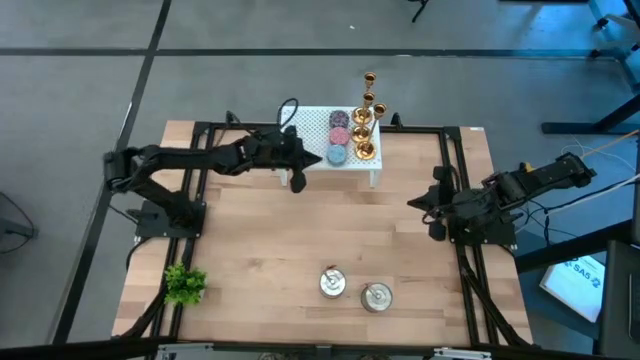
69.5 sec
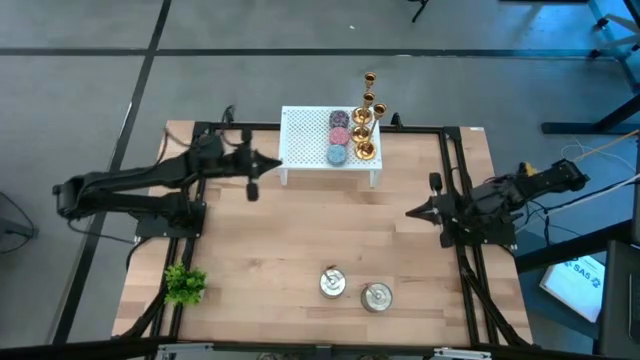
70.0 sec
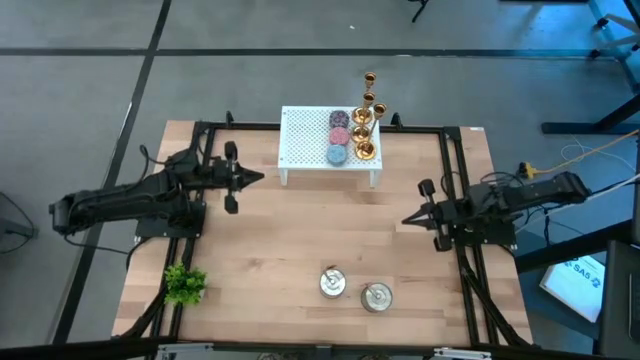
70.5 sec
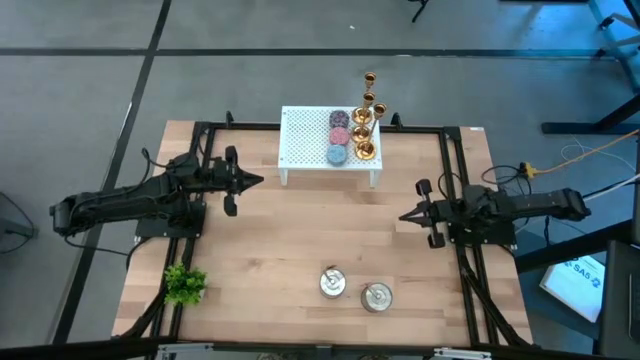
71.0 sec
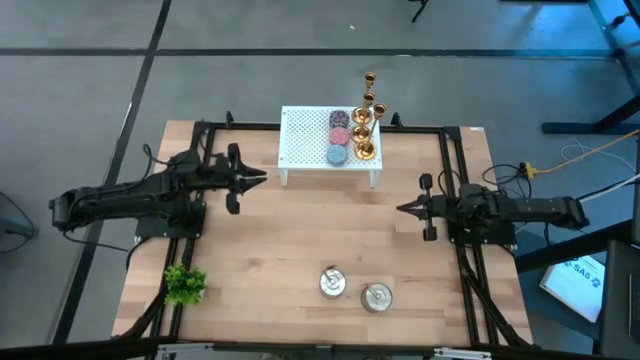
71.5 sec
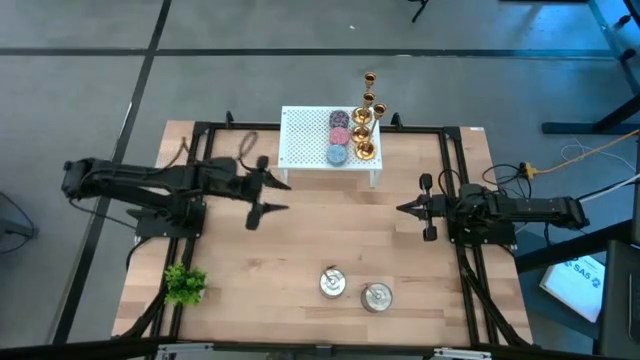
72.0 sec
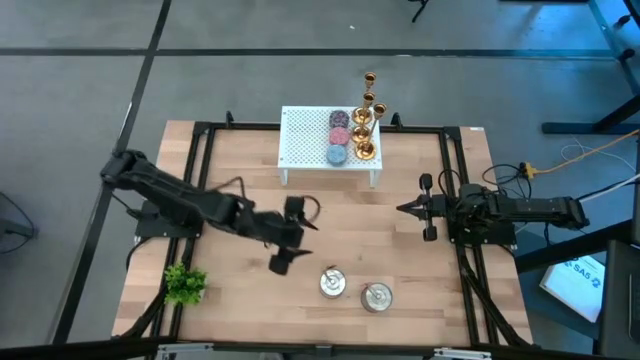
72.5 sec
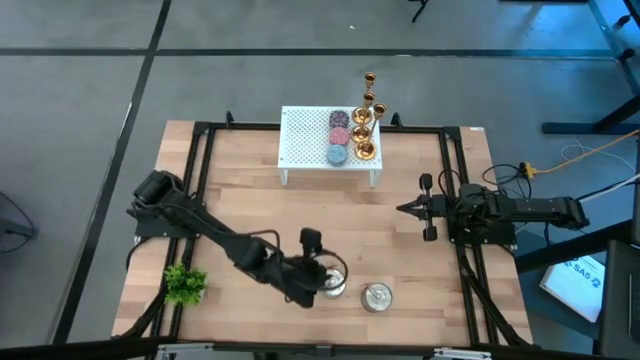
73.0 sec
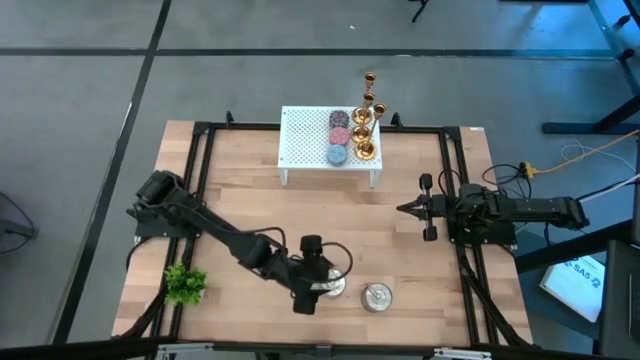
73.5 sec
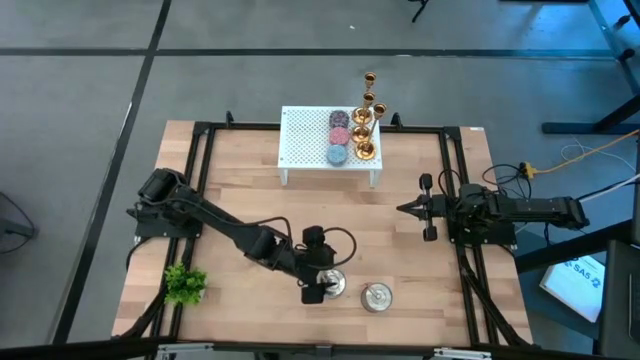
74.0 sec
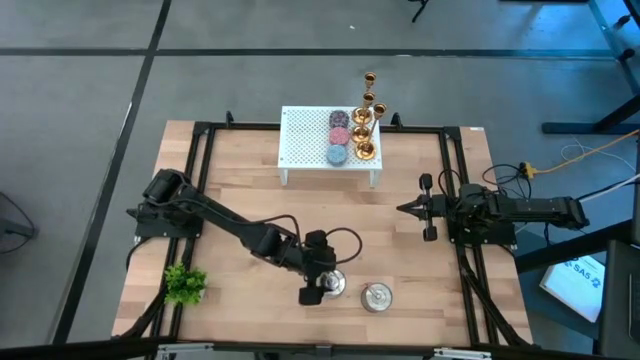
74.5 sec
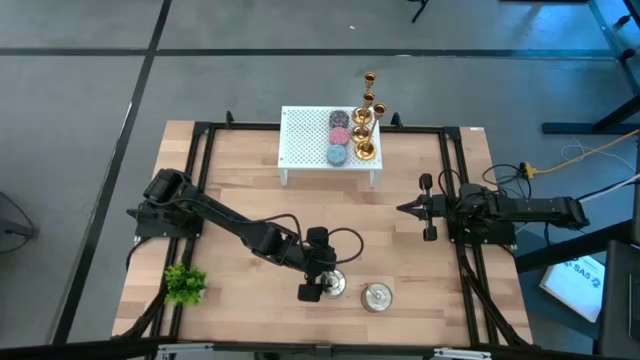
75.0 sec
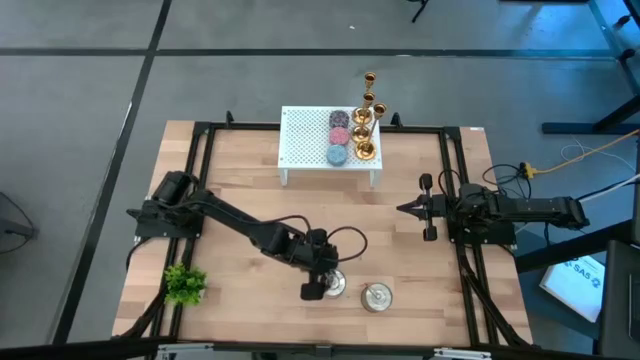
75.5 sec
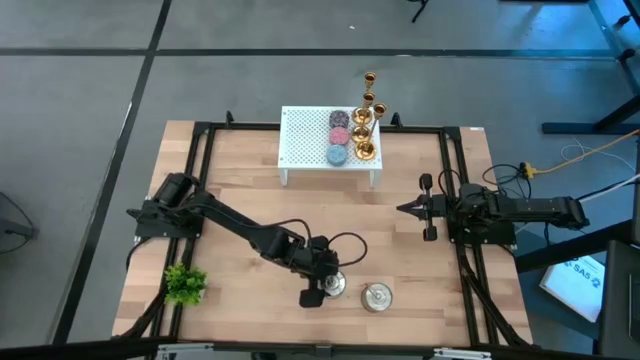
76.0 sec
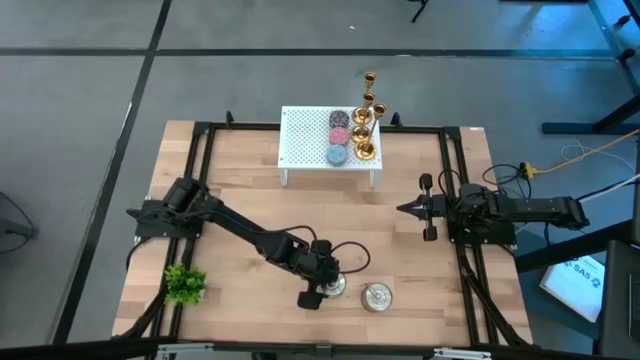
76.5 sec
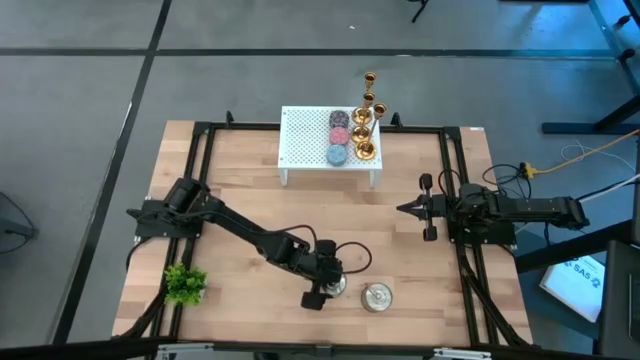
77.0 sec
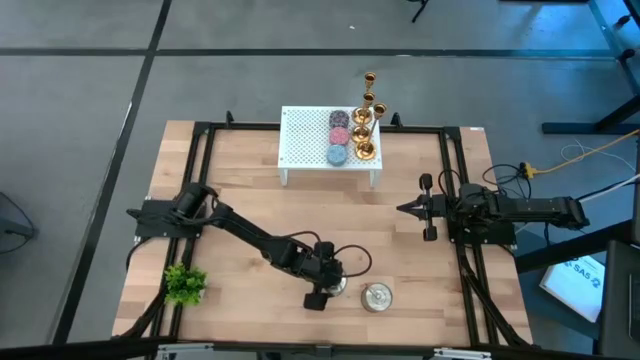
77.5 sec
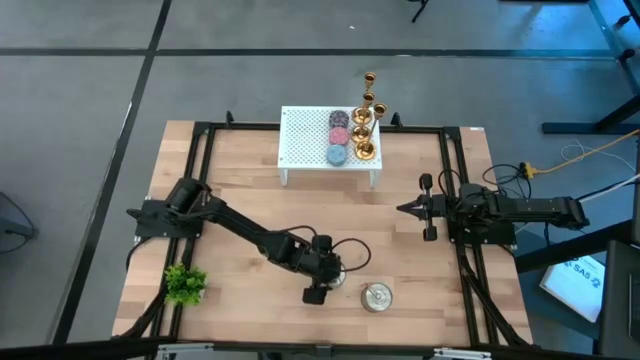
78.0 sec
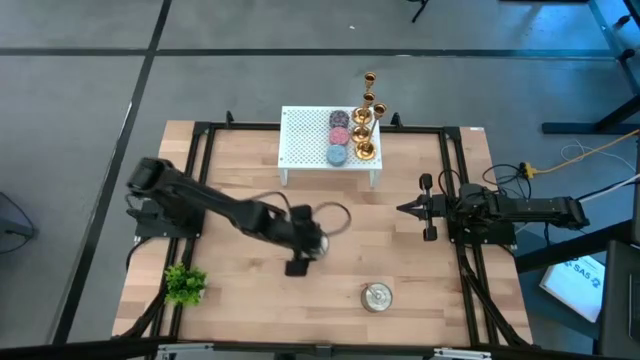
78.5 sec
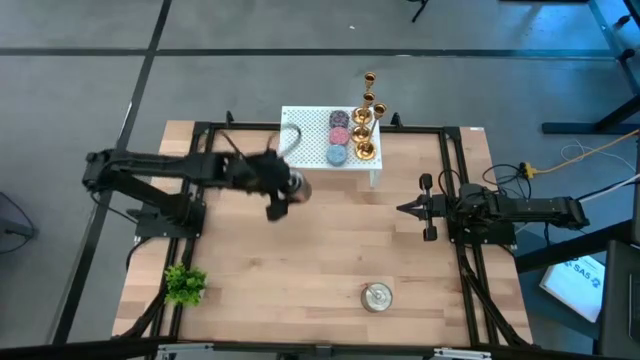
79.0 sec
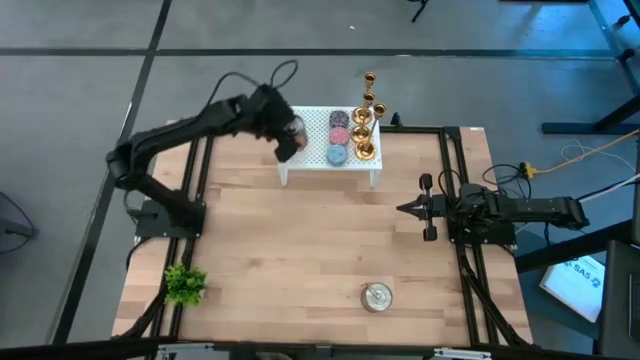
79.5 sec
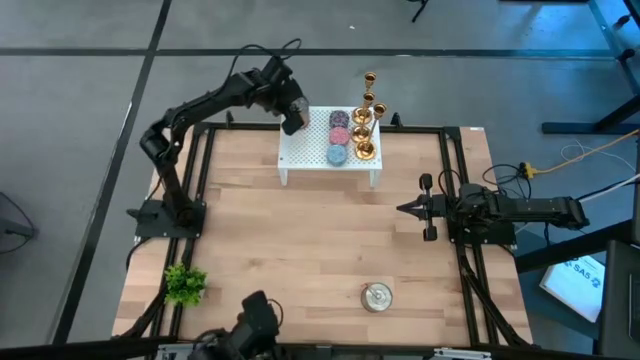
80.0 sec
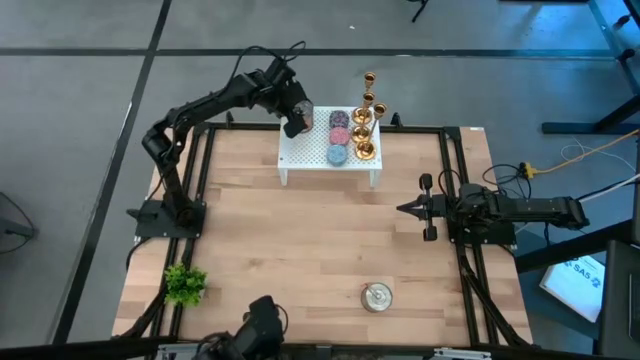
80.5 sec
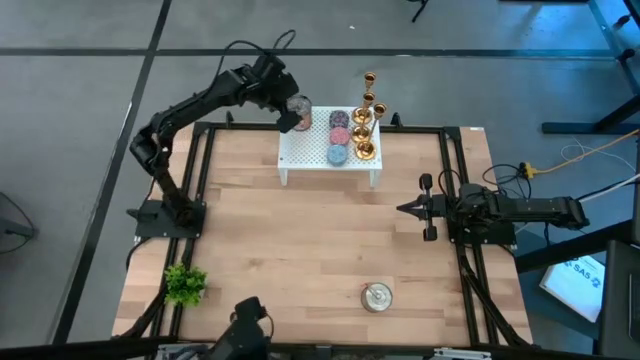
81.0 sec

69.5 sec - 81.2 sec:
Task: Pick & Place candle stick holders
Put the left orange scented candle on the shelf

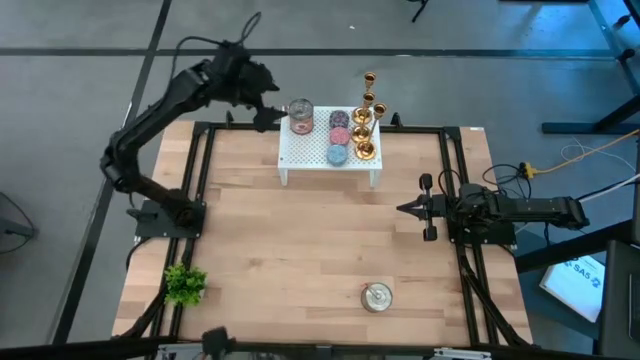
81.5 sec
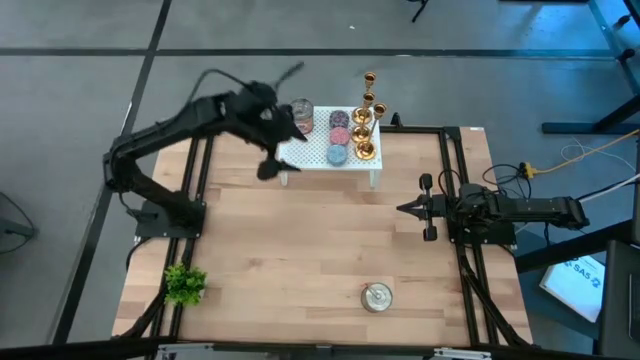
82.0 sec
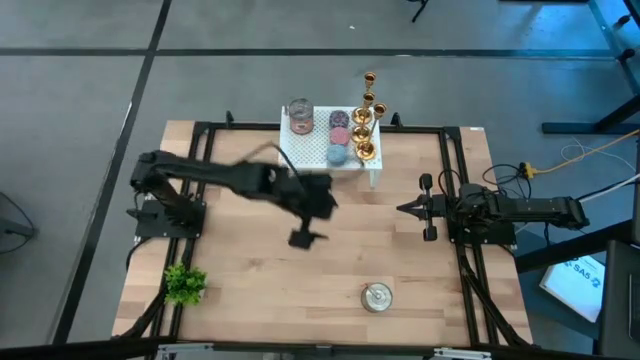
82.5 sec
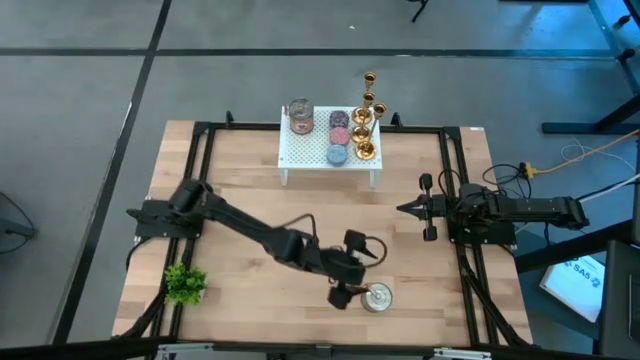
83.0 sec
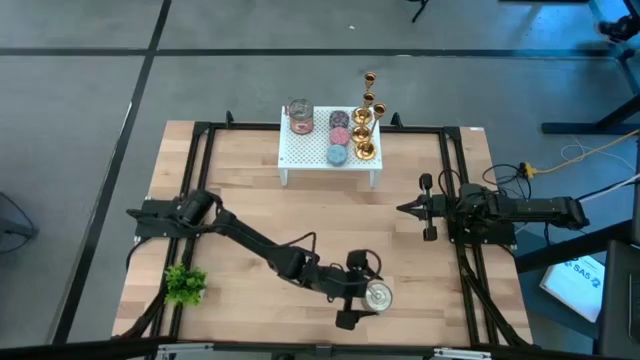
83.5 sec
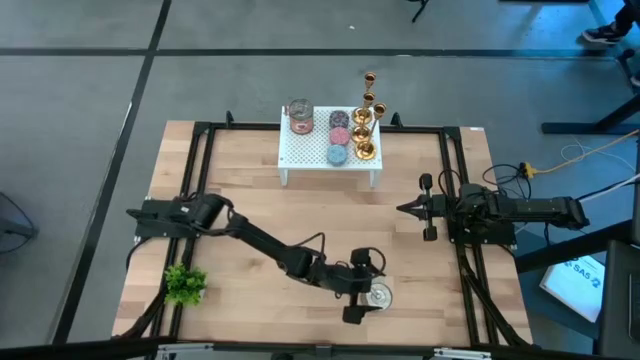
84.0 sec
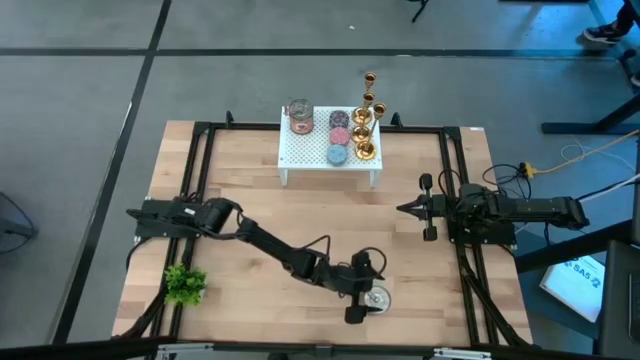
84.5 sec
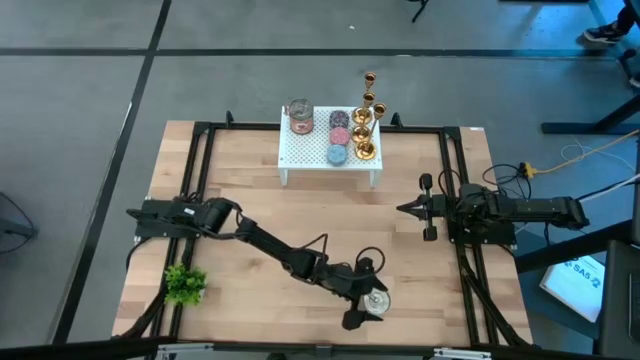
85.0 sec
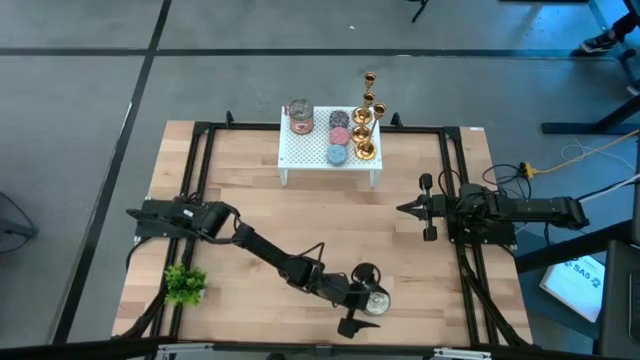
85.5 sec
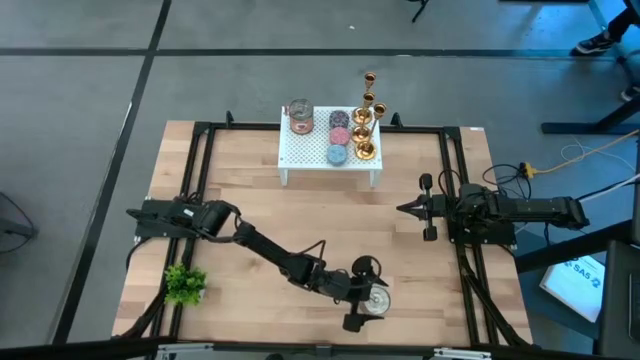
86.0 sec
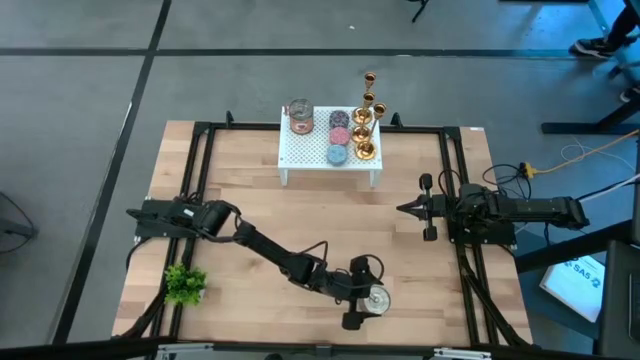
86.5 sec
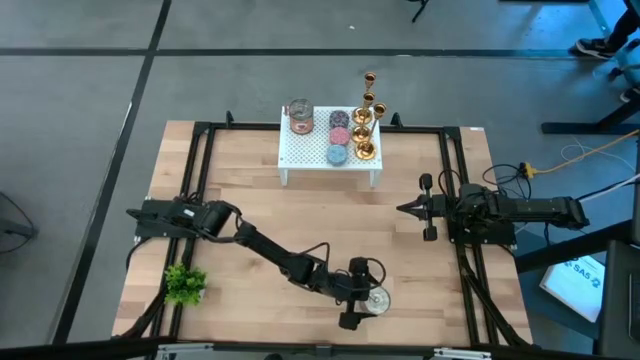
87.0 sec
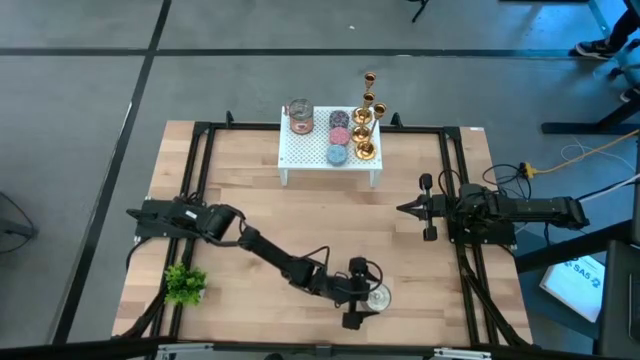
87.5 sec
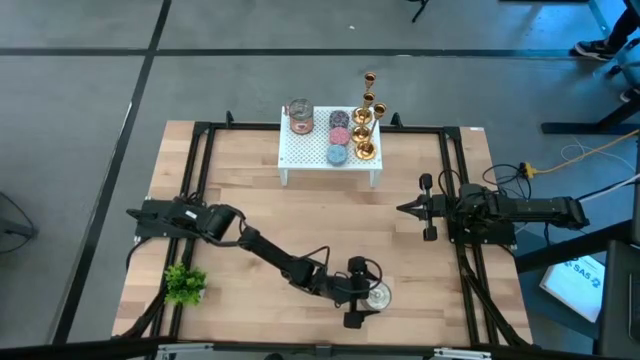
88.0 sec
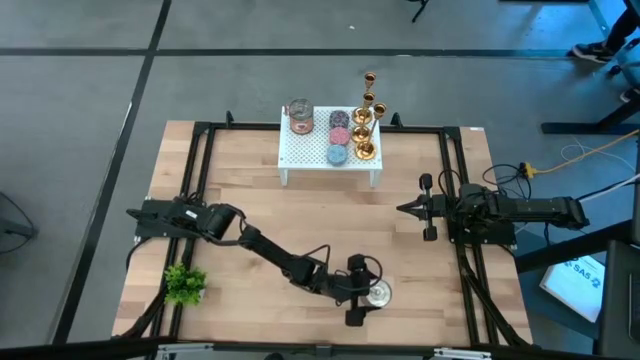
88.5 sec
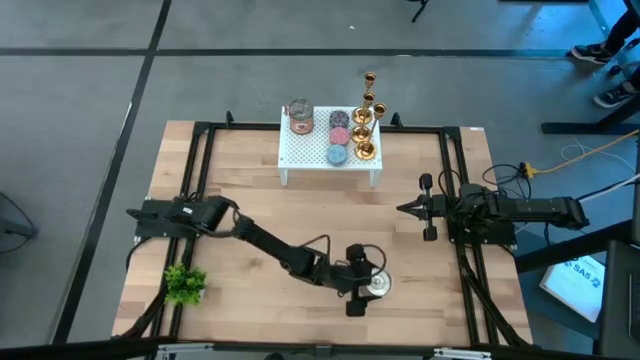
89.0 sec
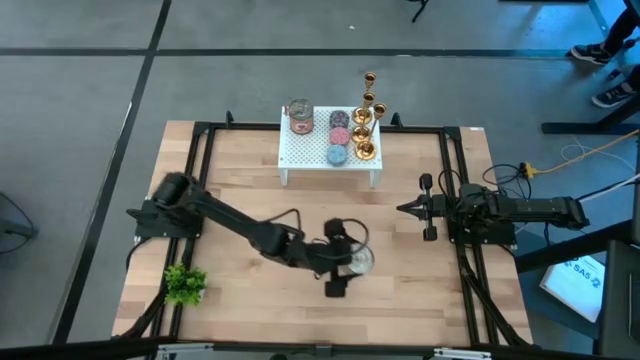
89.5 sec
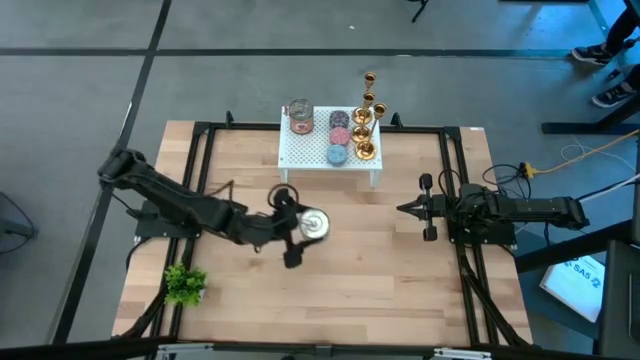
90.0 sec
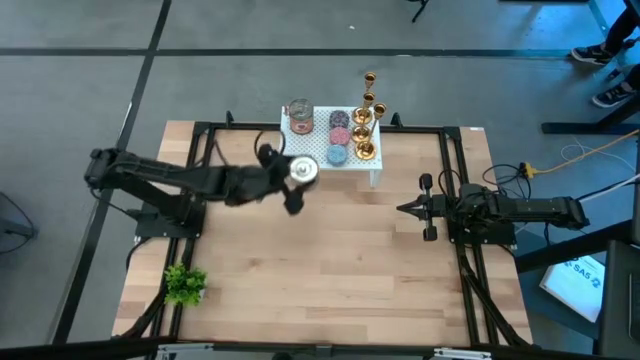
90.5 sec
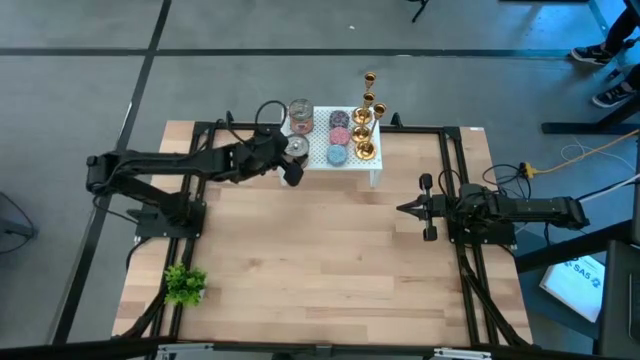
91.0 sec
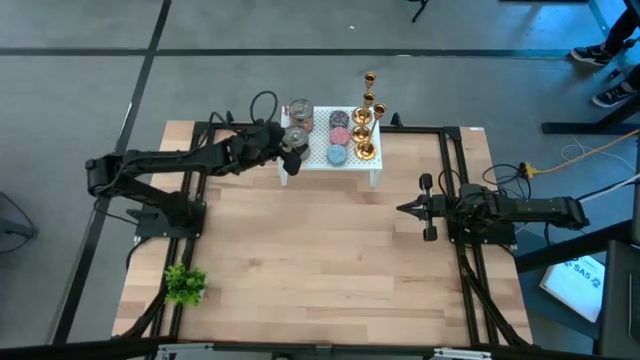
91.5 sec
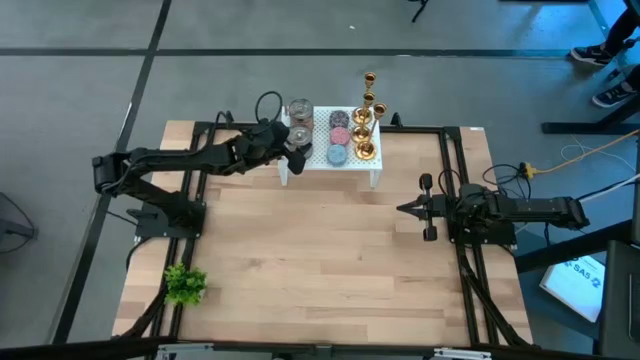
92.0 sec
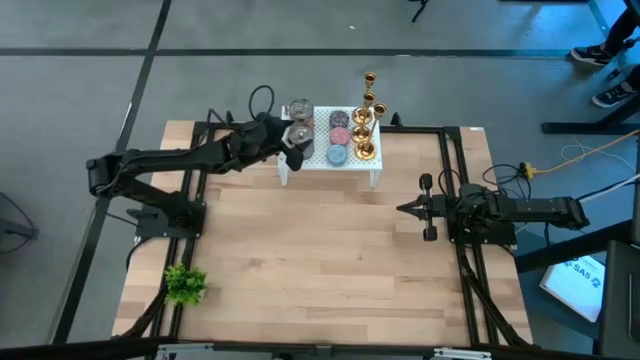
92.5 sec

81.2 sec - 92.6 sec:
Put the orange scented candle on the shelf and align it with the other orange scented candle
